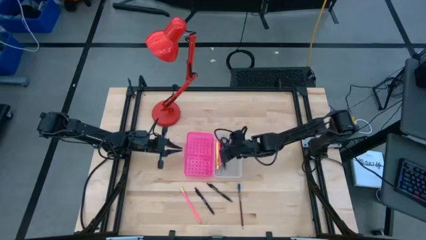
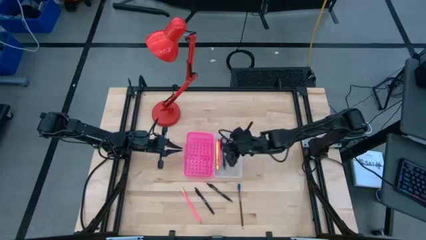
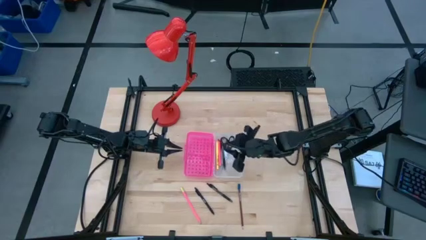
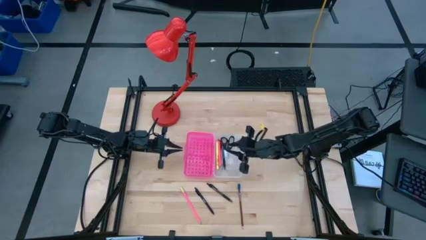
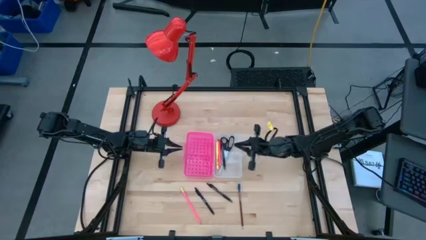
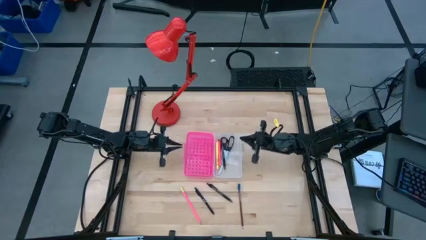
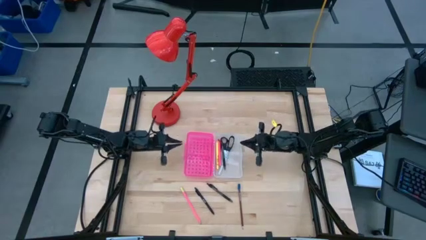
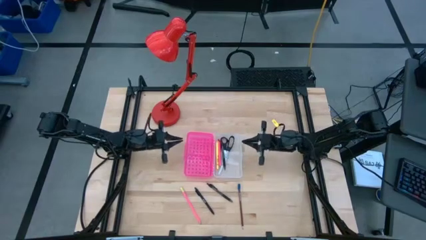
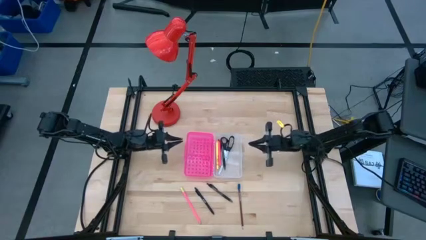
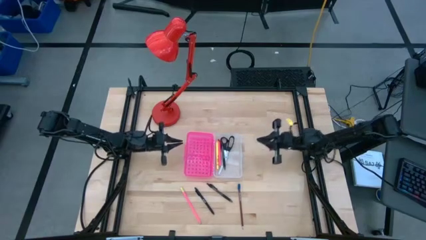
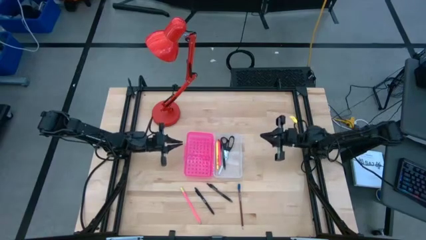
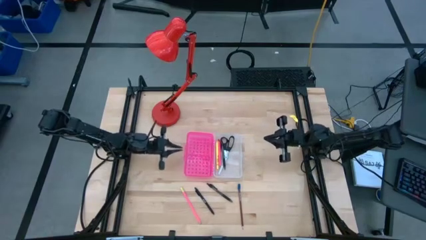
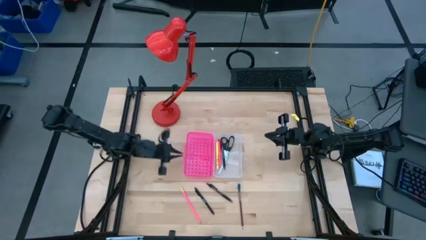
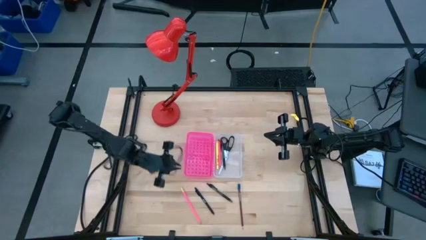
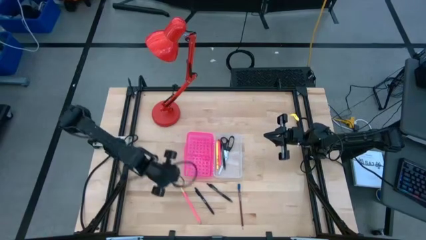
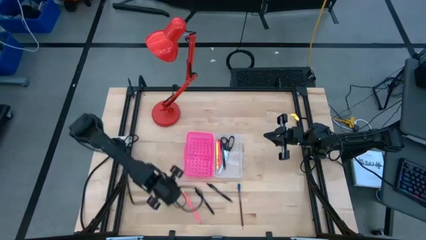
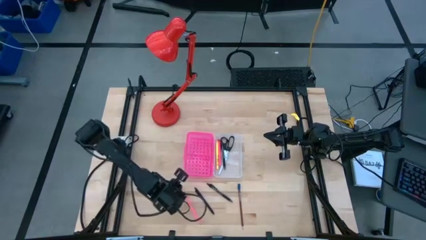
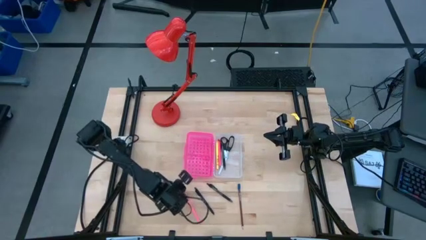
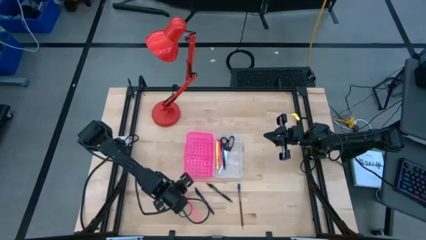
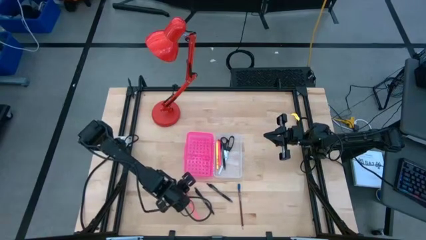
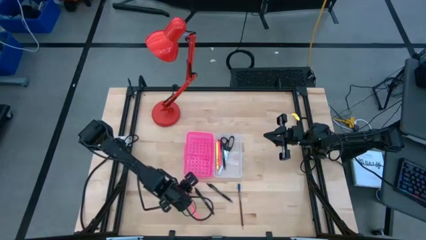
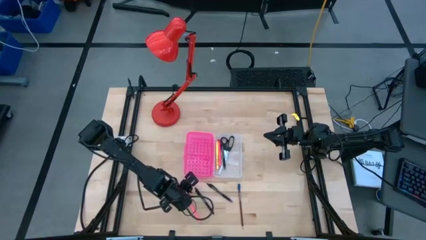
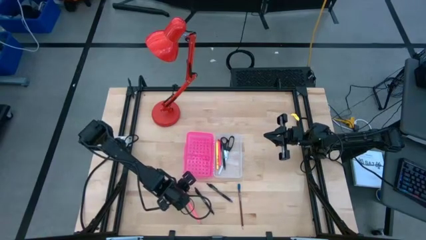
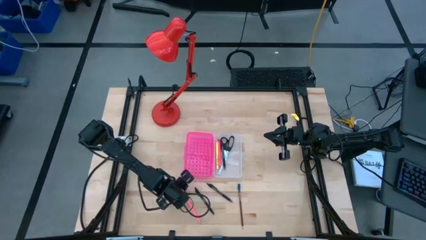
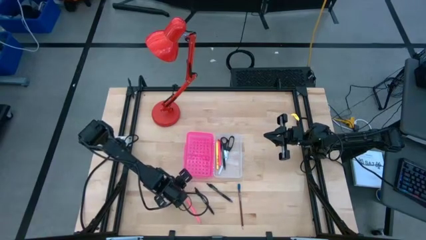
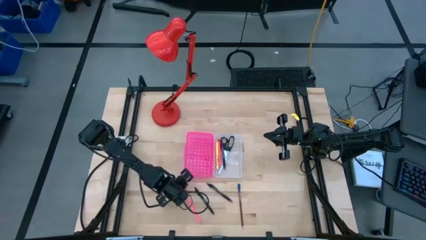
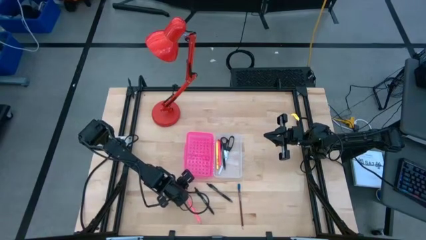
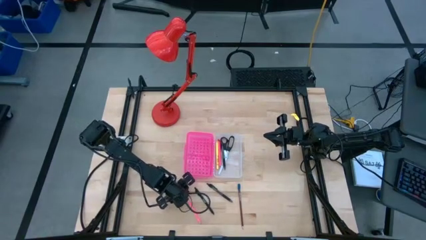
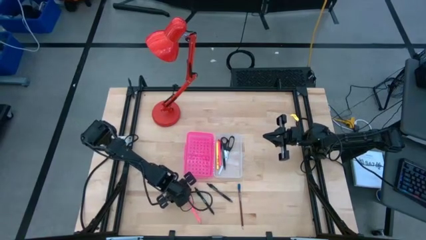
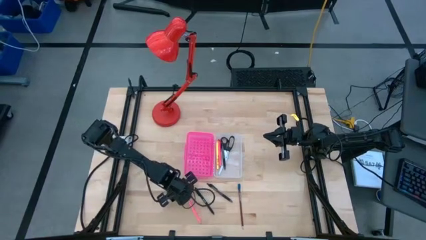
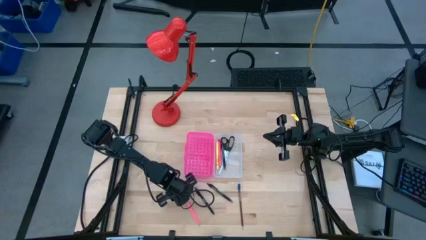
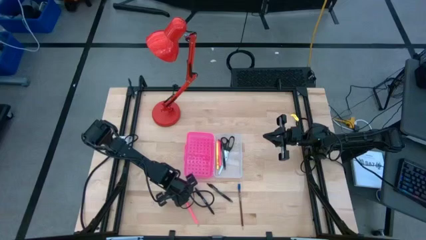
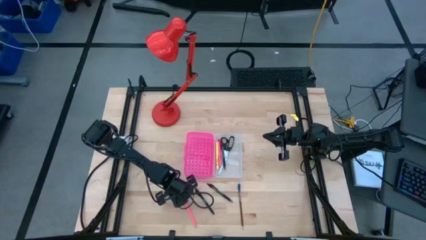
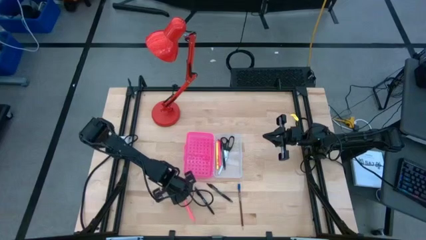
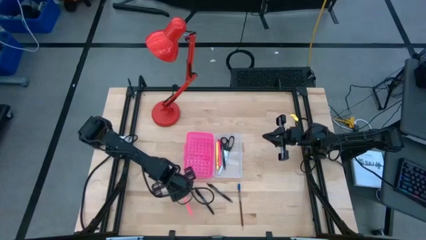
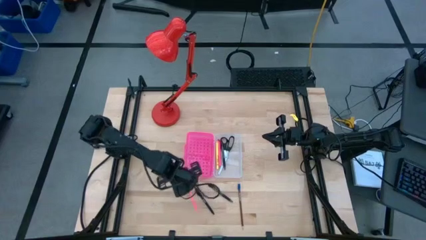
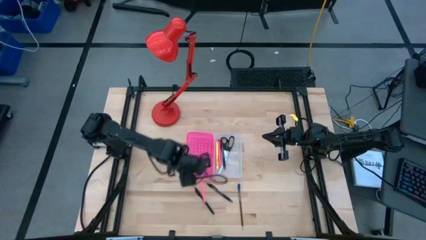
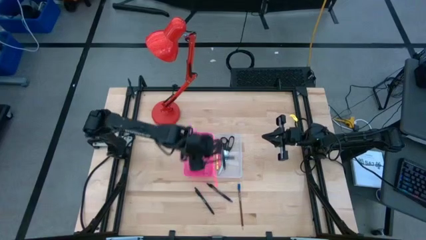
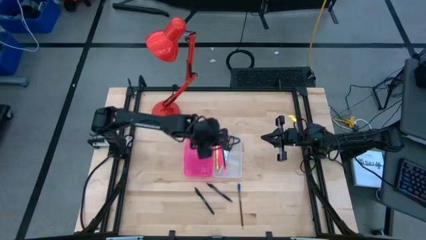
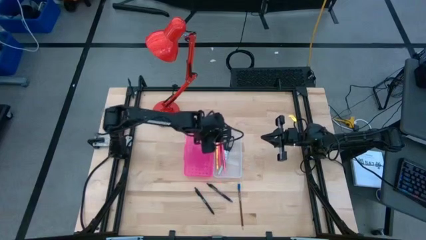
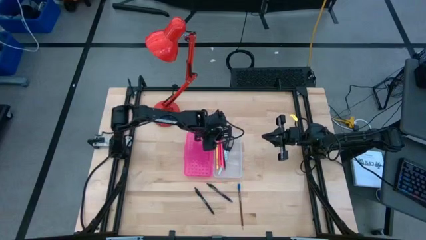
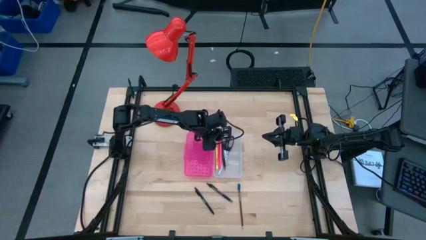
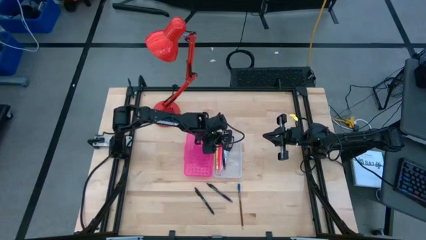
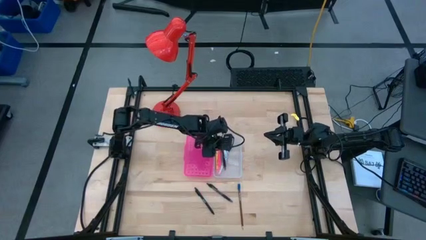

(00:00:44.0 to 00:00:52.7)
Task: Pick & place school supplies into a supply box
Put the pink pencil into the pink supply box

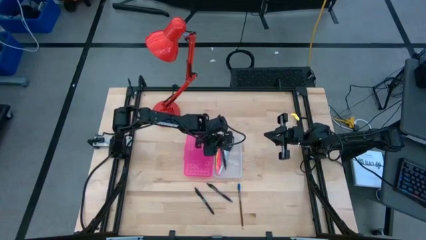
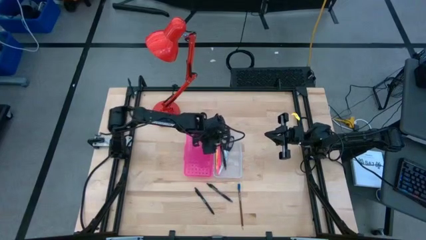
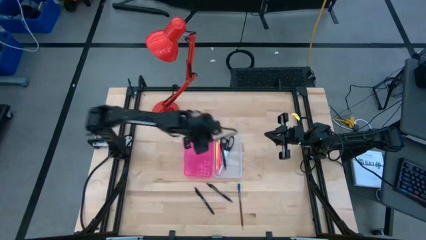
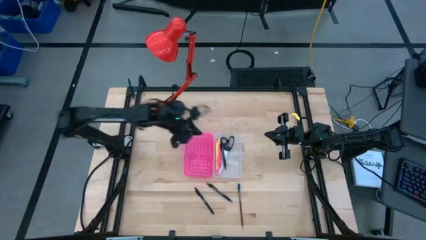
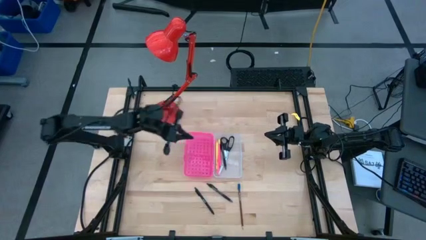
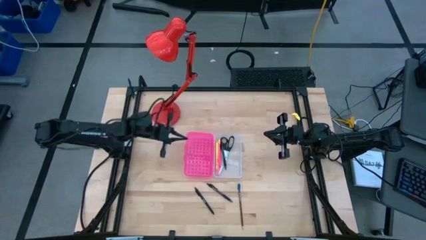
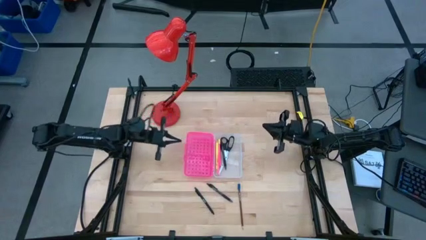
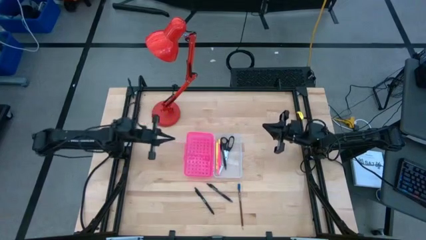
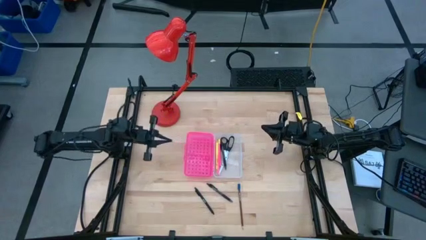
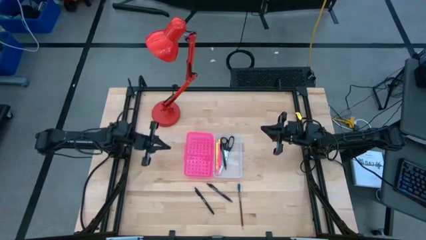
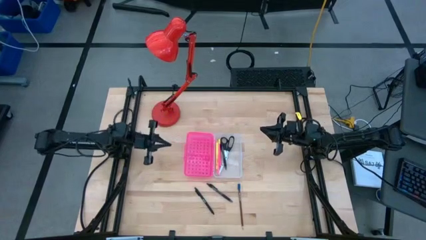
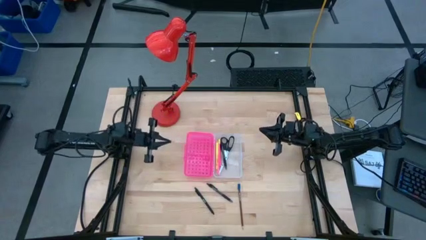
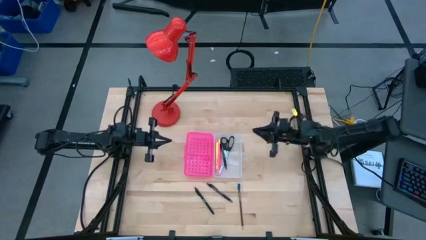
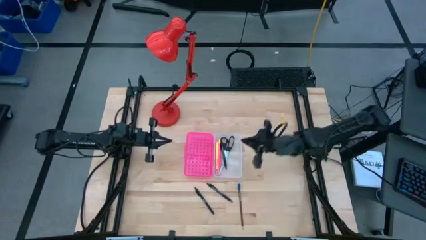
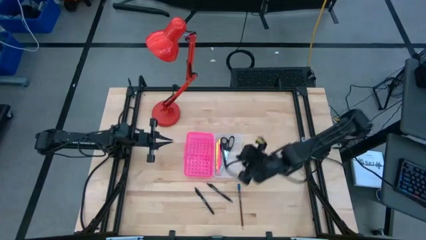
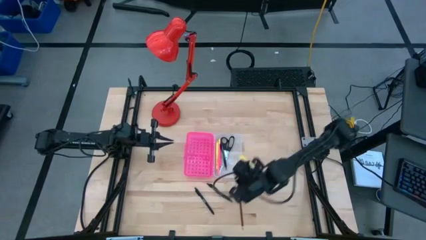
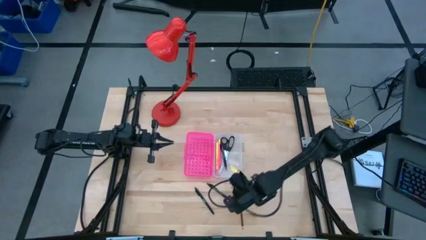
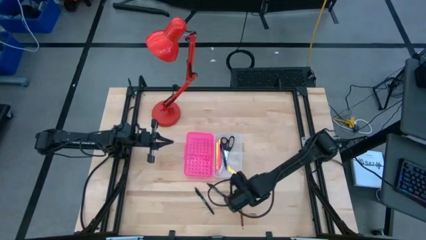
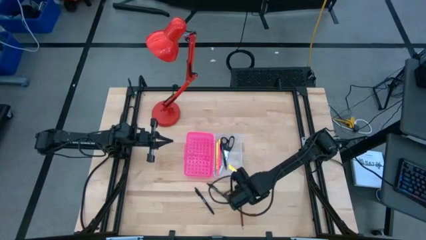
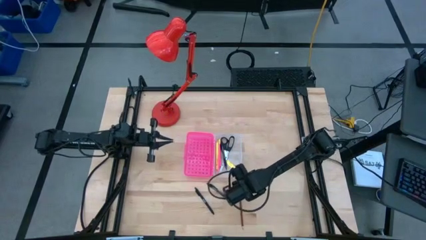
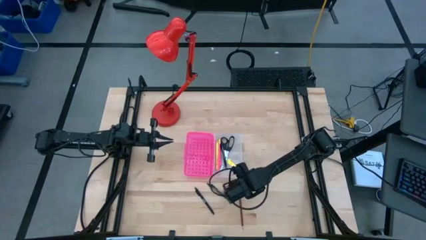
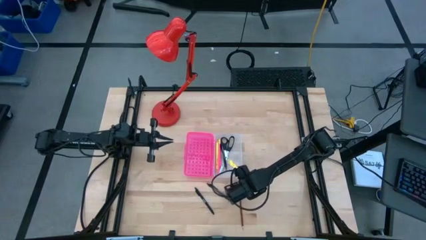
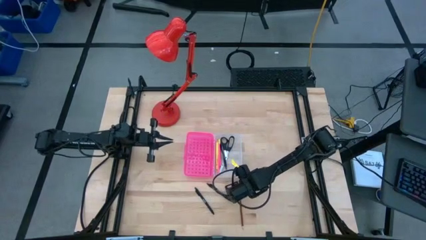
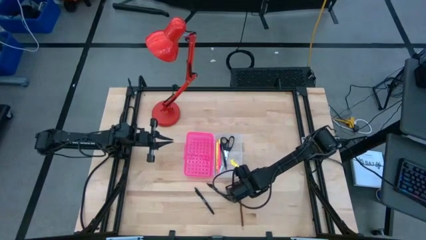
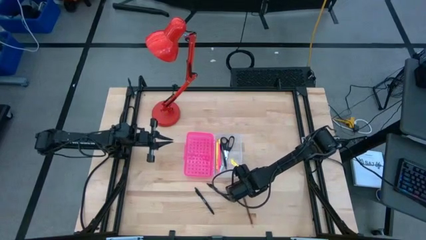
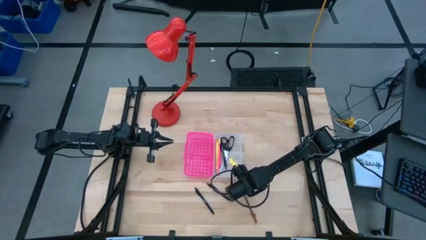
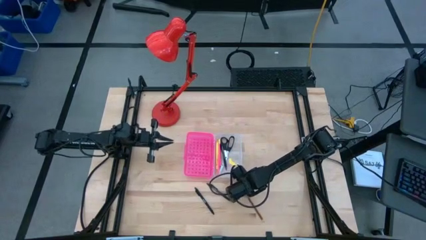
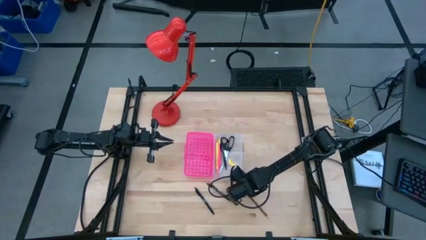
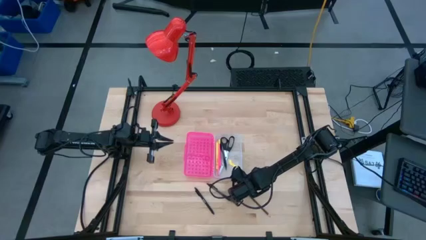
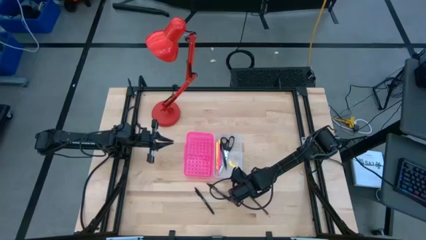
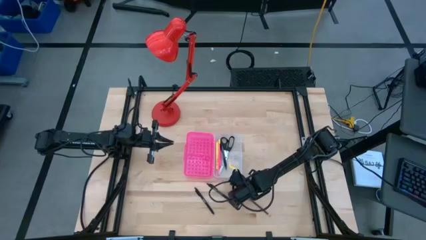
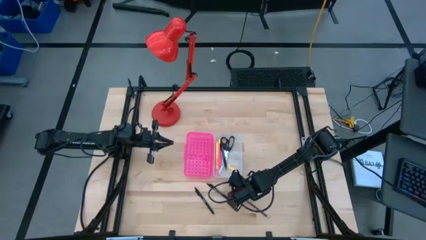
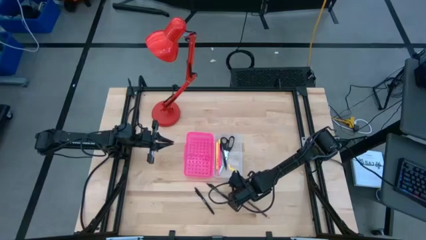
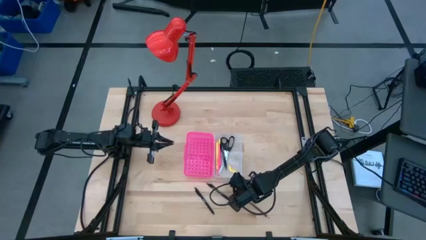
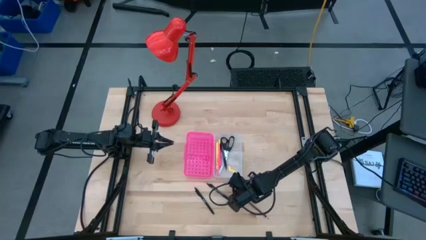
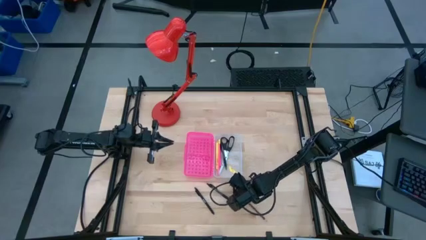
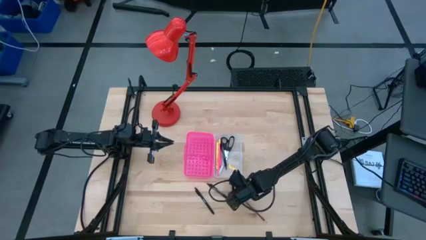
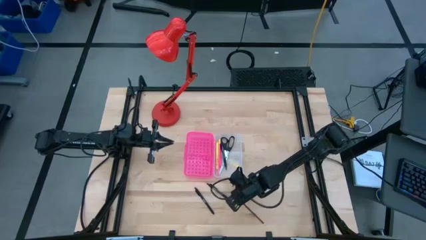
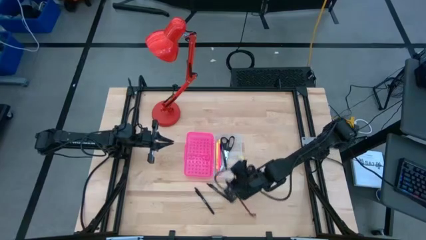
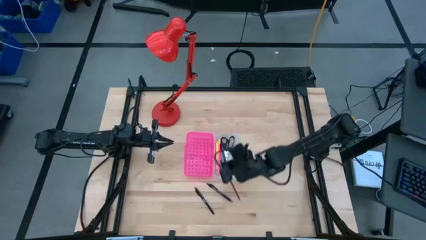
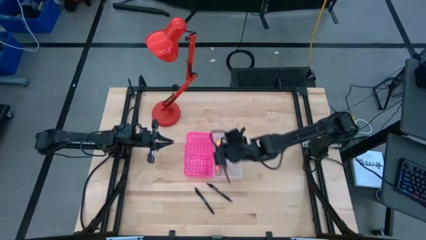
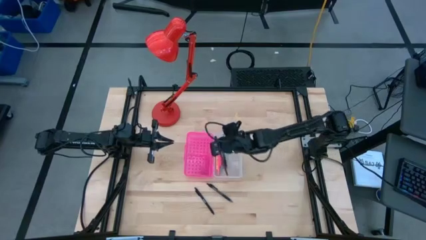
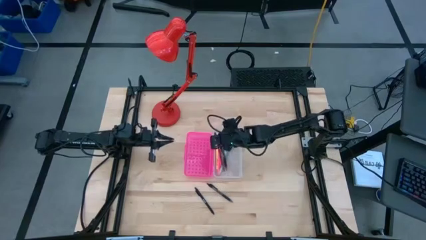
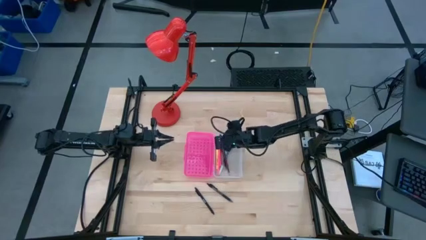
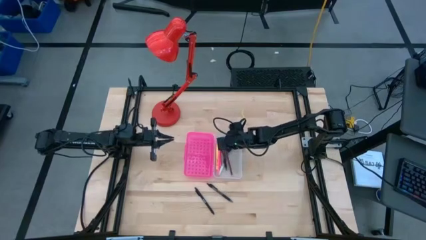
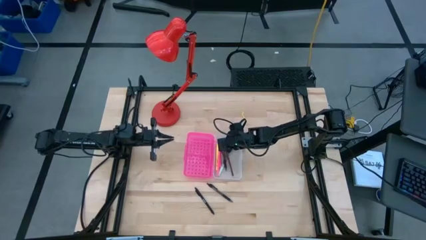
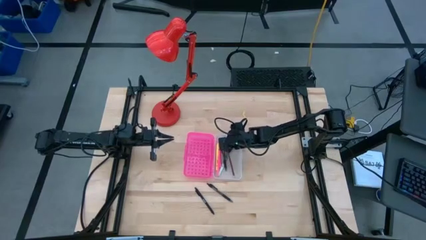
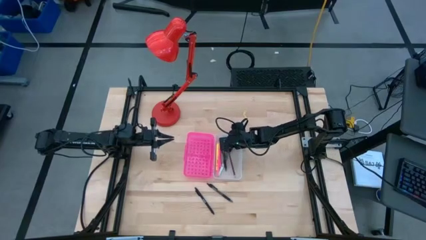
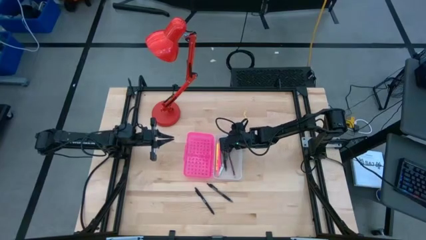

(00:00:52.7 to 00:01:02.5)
Put the brown pencil into the pink supply box
